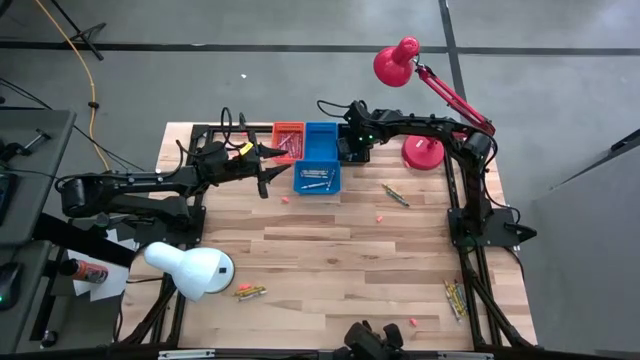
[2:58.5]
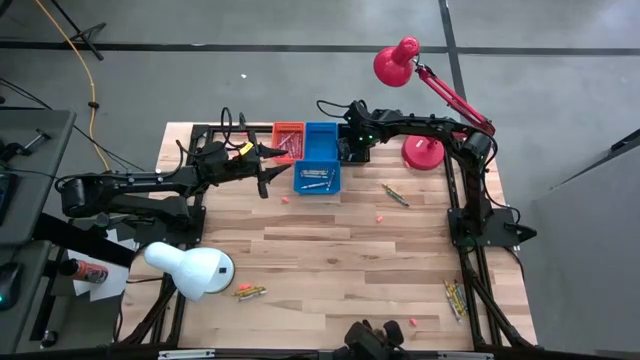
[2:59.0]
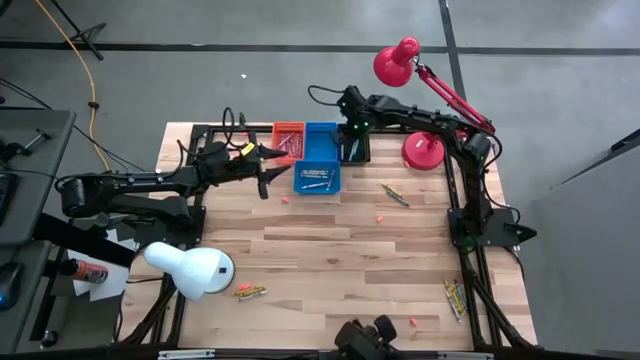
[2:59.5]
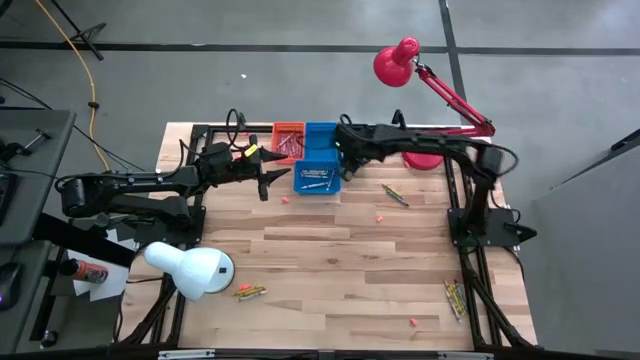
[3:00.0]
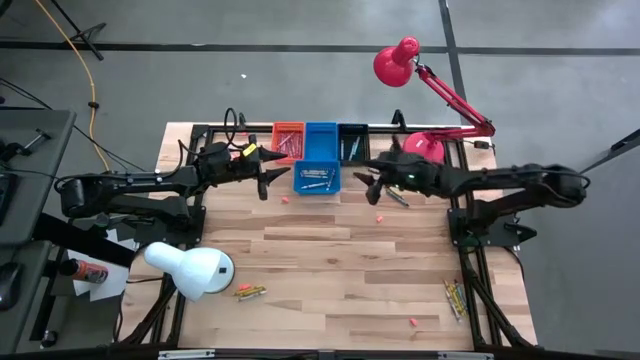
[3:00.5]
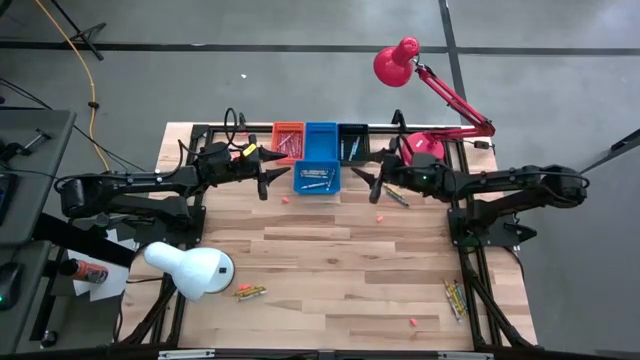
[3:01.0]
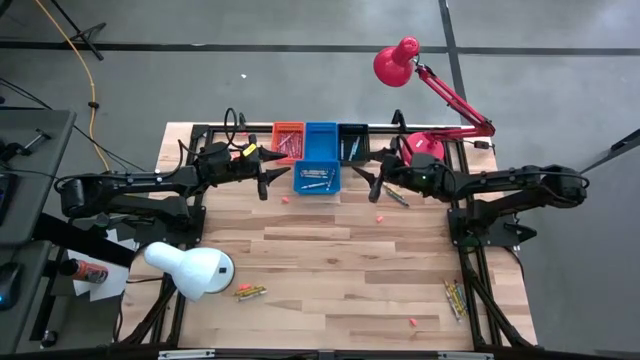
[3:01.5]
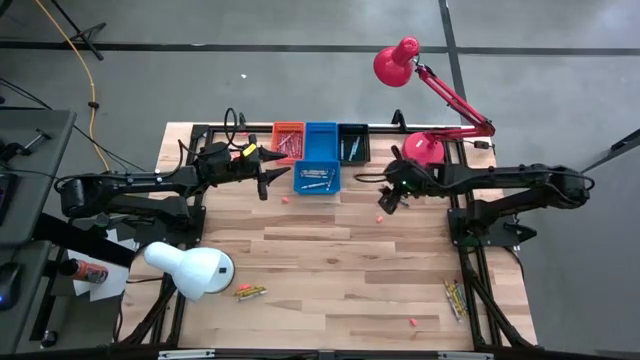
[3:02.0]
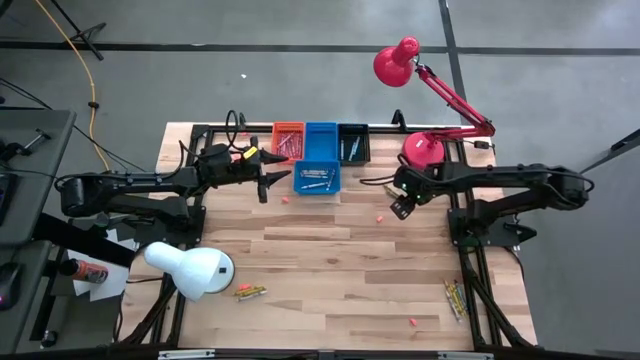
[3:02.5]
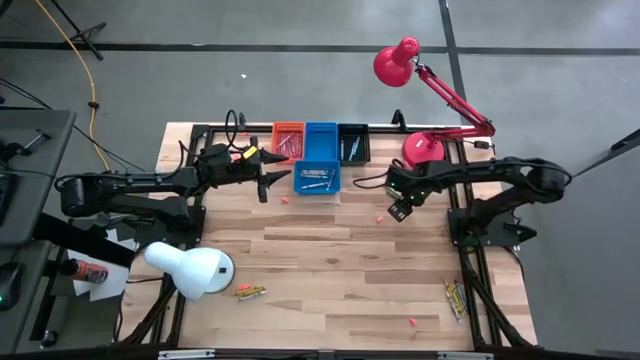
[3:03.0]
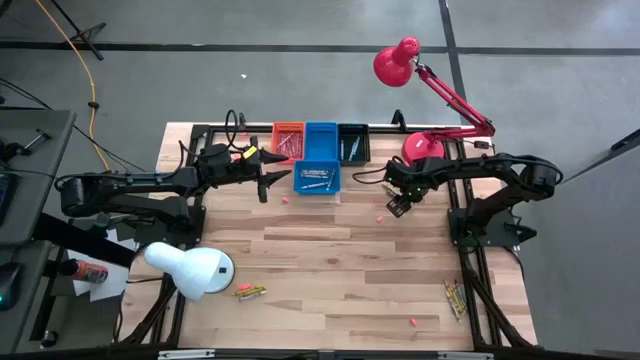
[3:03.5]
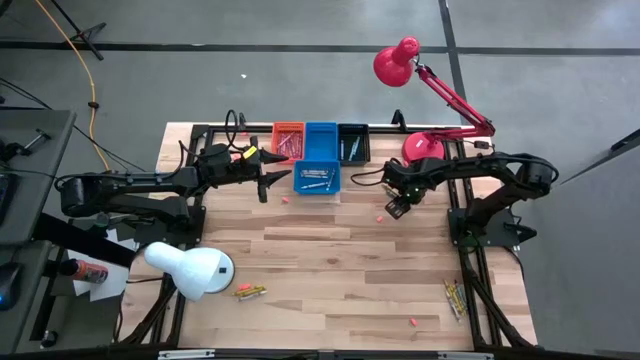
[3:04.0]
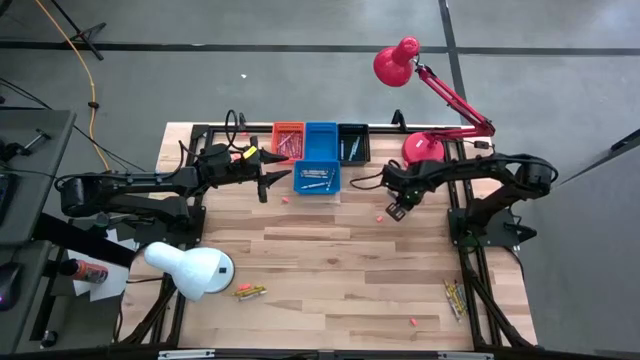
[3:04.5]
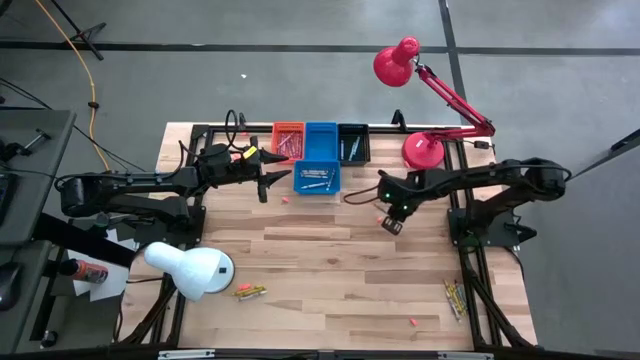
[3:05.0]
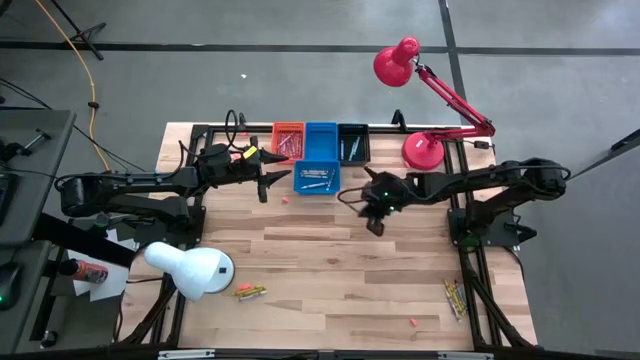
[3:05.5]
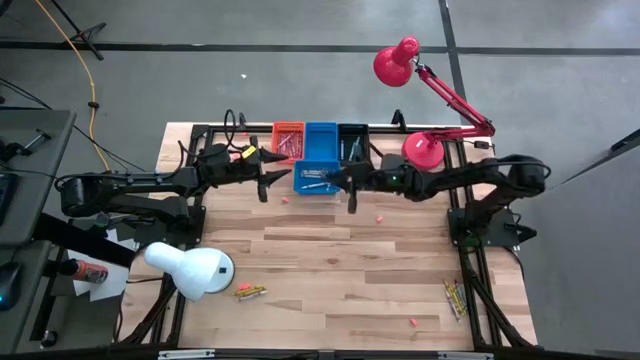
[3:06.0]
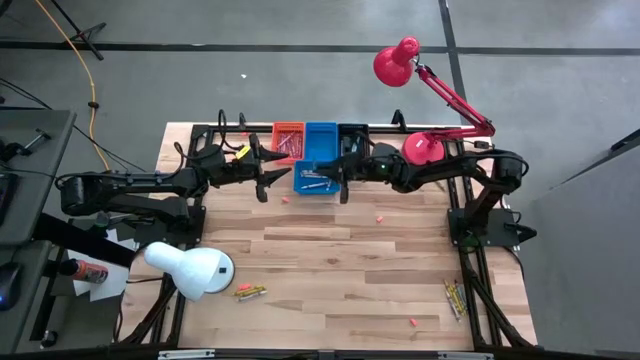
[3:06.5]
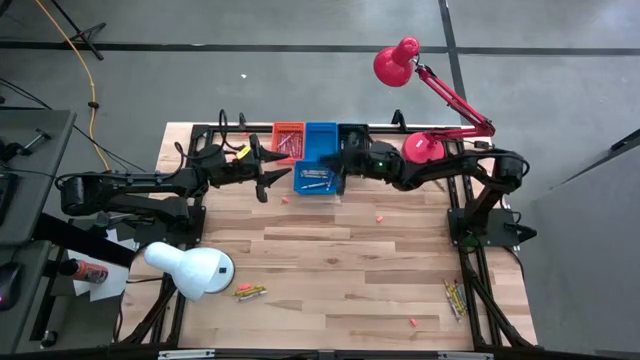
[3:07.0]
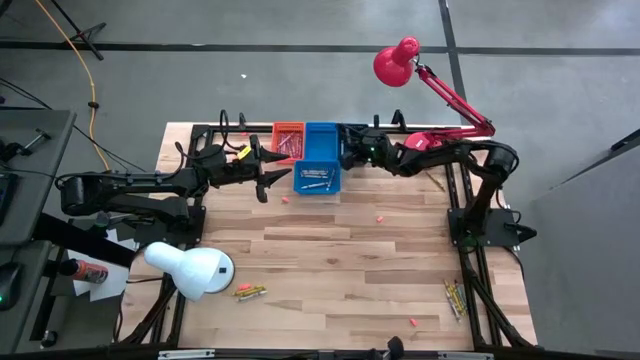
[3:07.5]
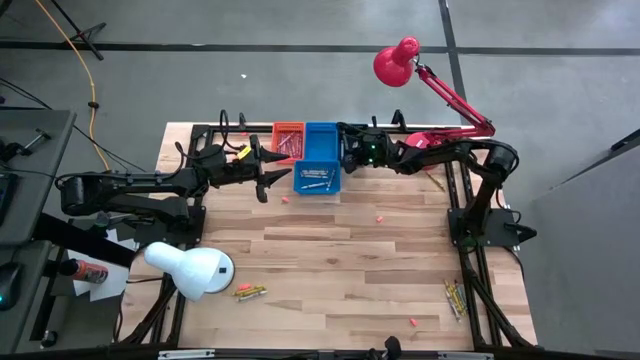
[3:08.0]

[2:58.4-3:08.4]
Task: Sort crayons
Put the blue crayon into the black bin

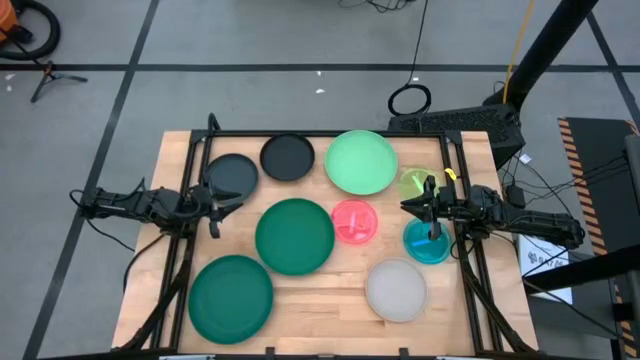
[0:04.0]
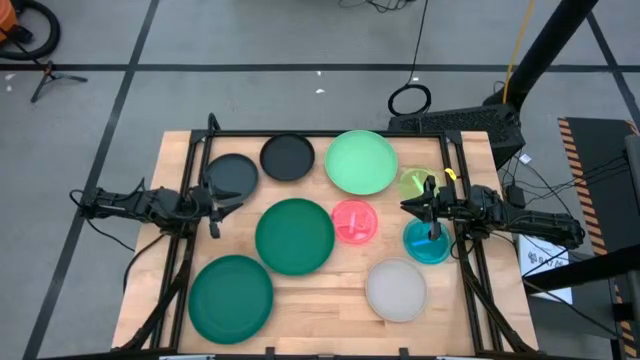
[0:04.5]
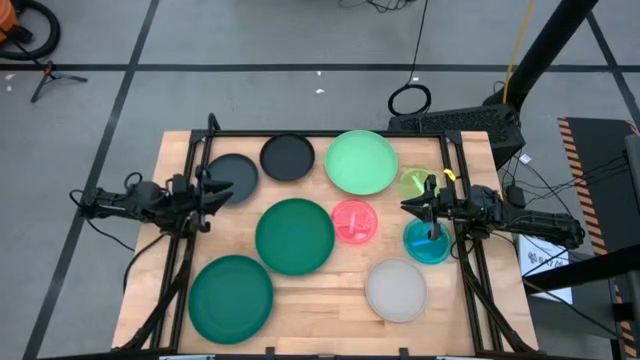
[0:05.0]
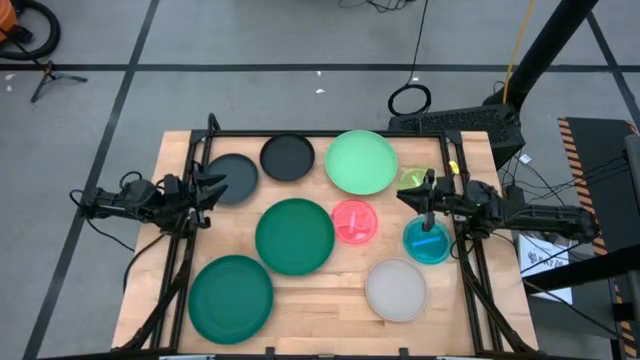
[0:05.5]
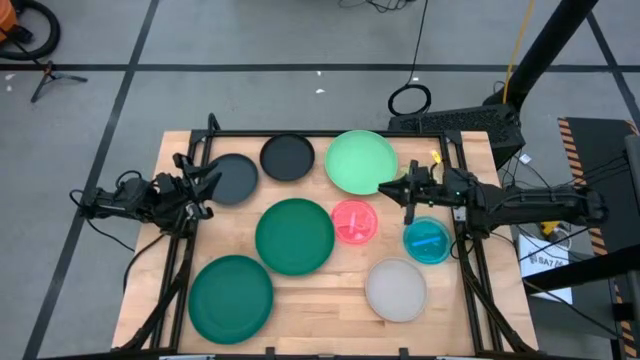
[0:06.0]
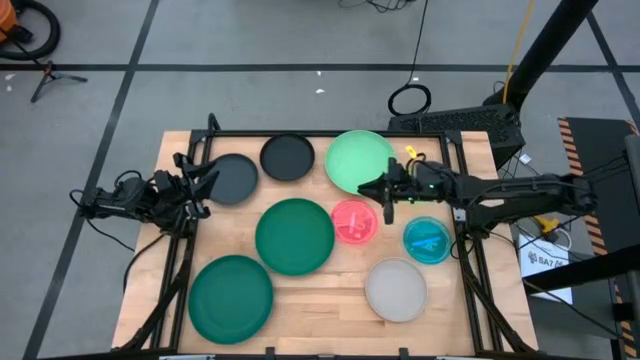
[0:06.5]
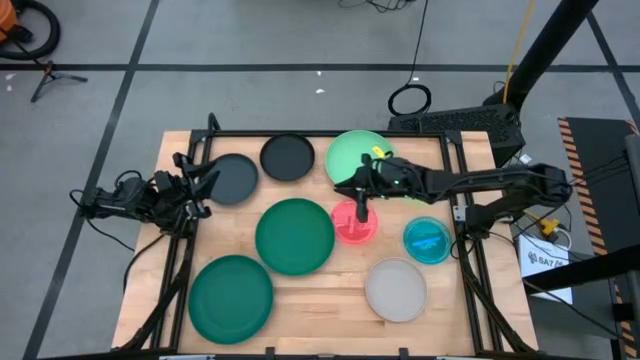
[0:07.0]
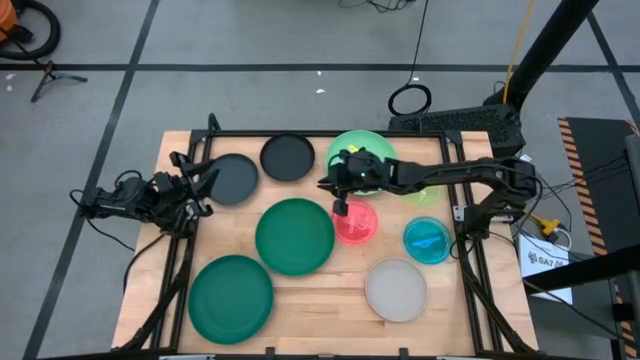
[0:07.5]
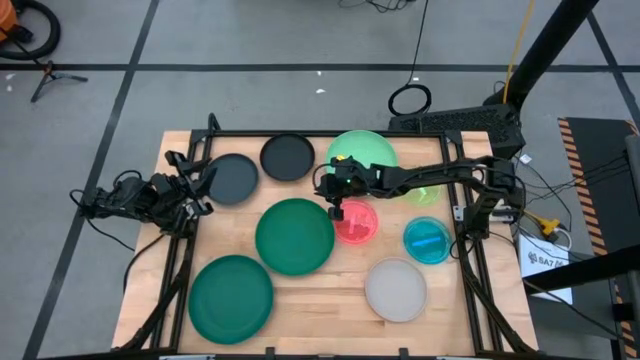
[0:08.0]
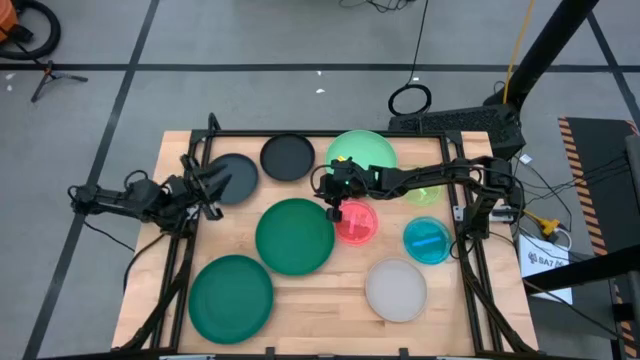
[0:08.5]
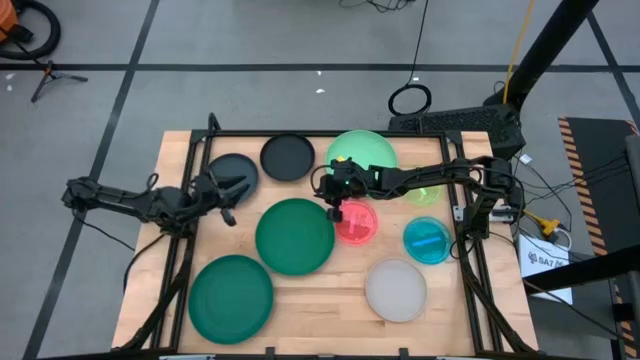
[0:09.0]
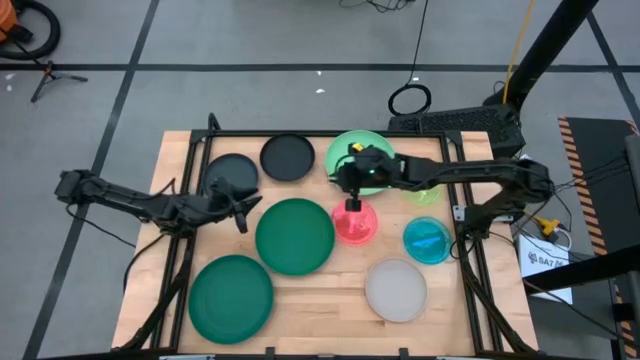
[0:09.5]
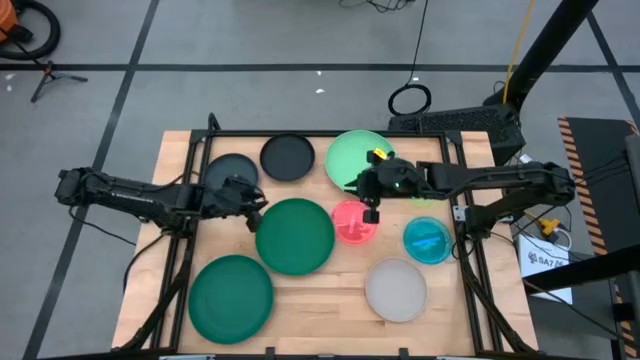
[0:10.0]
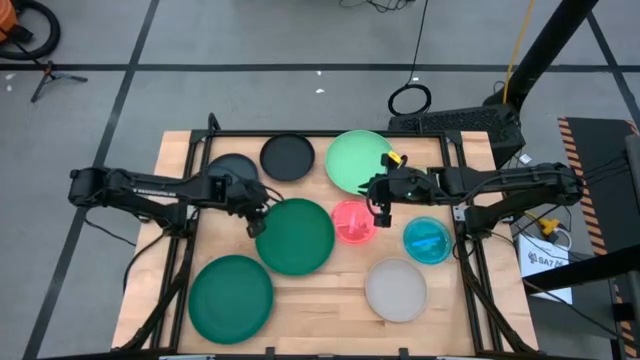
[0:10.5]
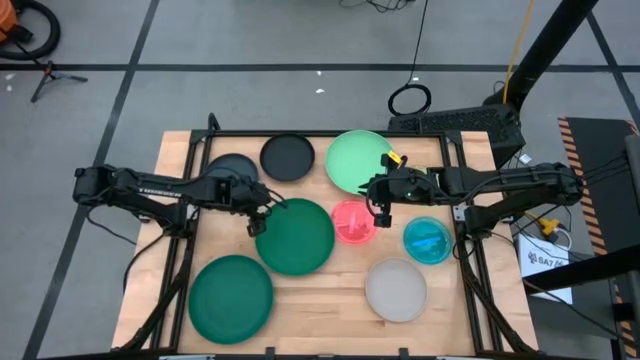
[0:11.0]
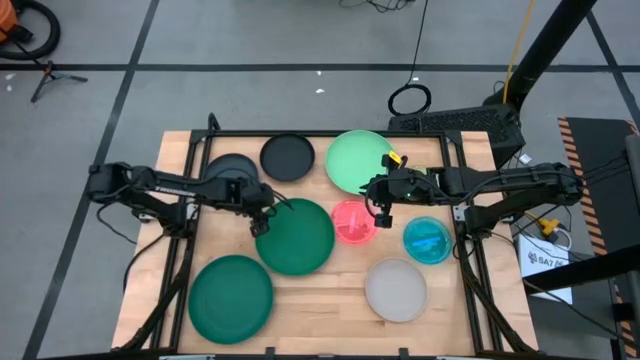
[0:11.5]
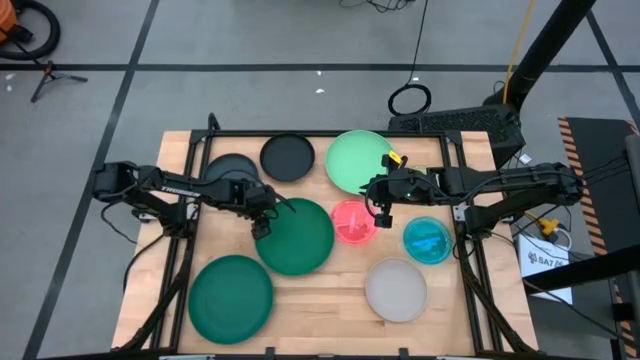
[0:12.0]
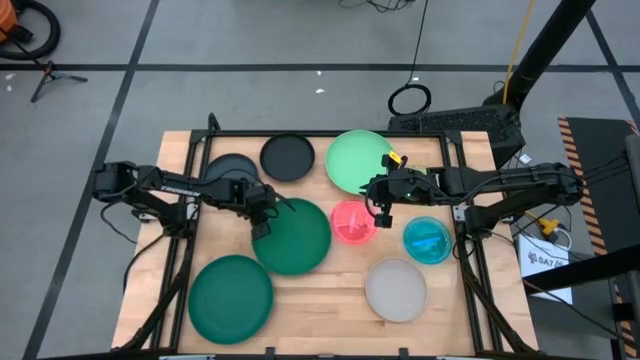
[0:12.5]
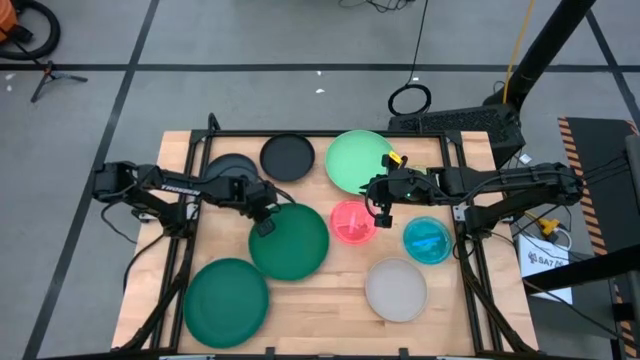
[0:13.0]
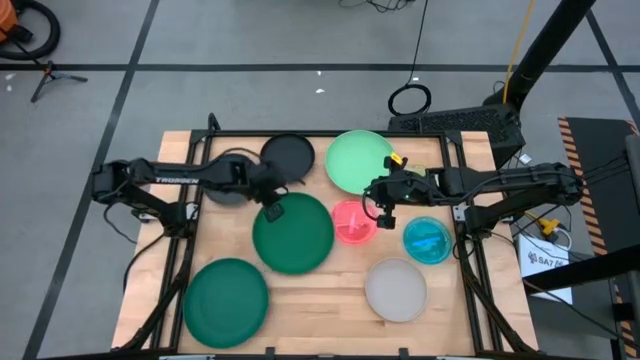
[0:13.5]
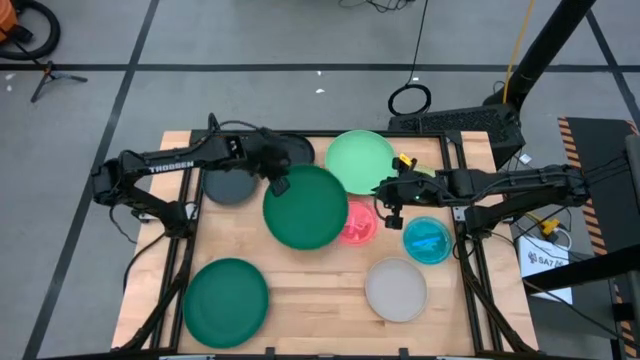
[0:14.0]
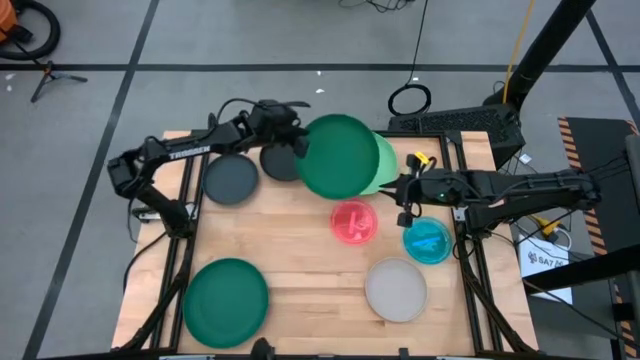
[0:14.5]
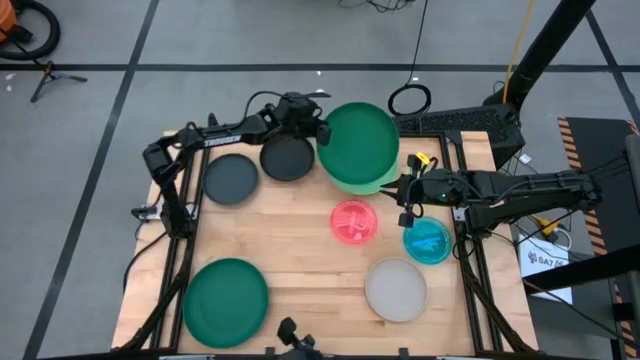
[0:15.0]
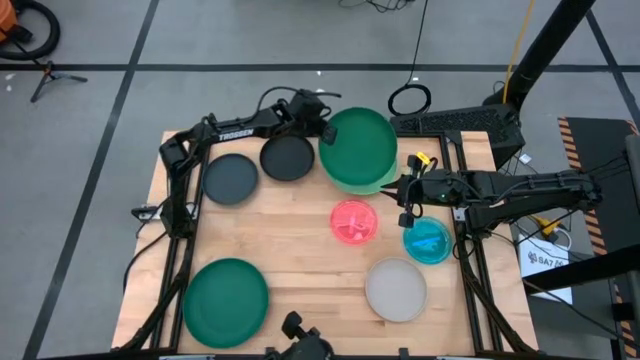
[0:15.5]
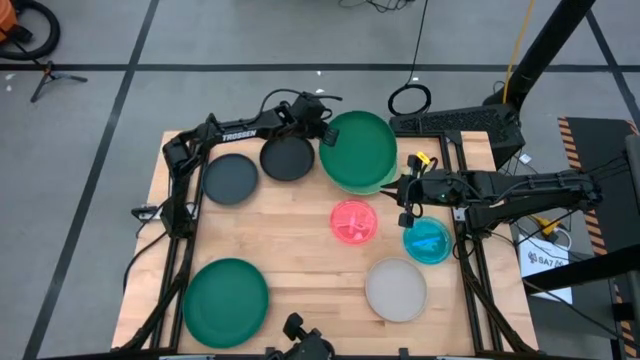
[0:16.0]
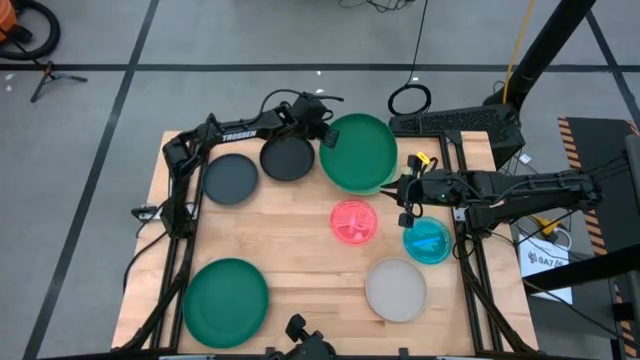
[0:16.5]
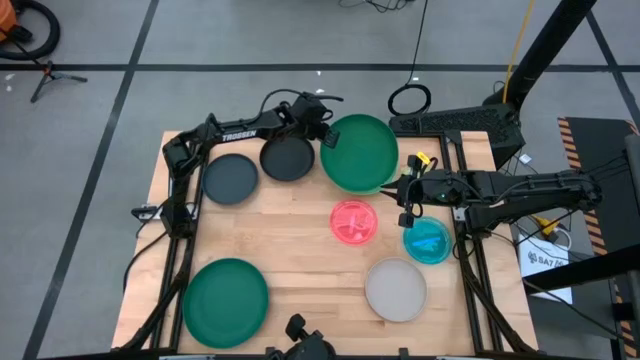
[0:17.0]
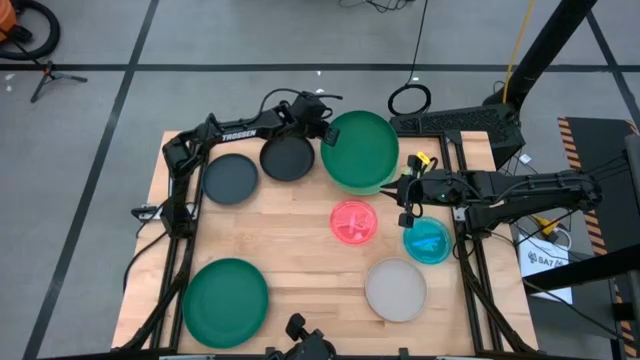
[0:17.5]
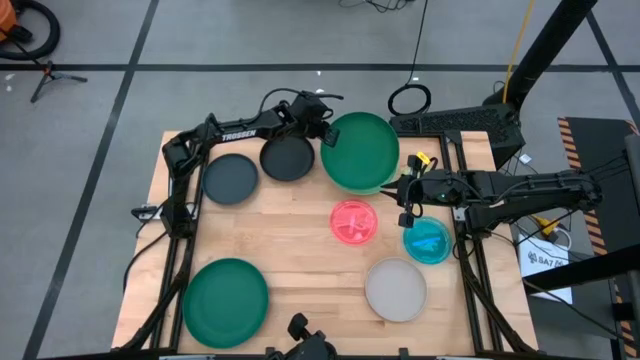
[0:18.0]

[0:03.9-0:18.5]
Task: Stack plastic plates
Stack the top dark green plate on top of the green plate
